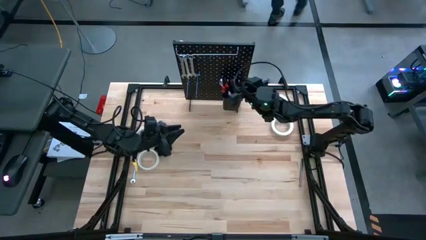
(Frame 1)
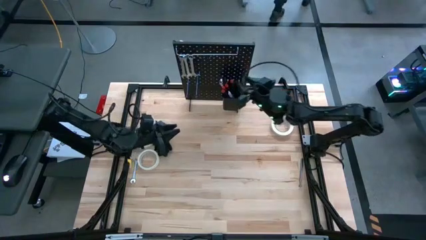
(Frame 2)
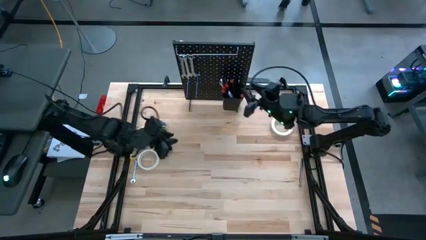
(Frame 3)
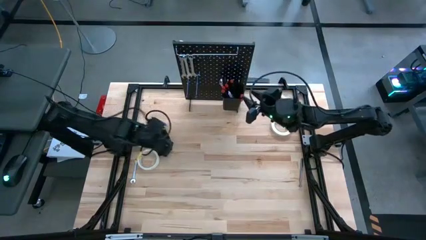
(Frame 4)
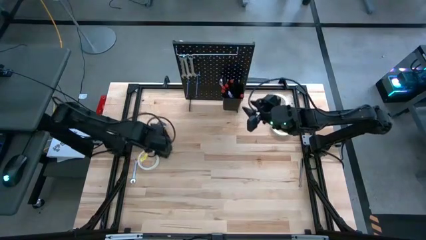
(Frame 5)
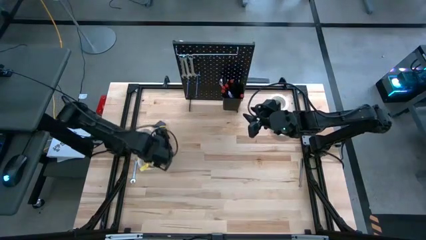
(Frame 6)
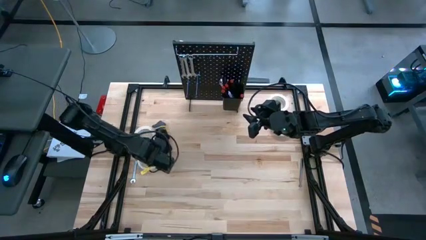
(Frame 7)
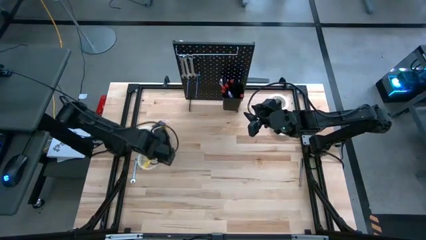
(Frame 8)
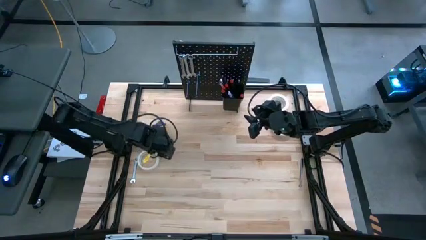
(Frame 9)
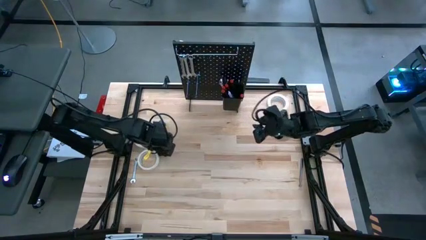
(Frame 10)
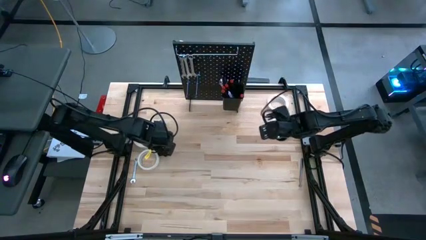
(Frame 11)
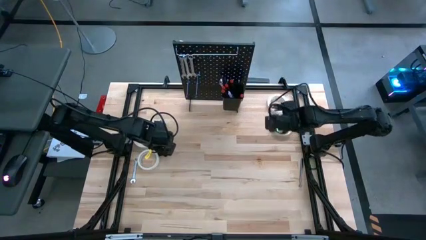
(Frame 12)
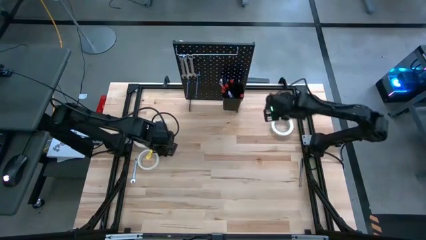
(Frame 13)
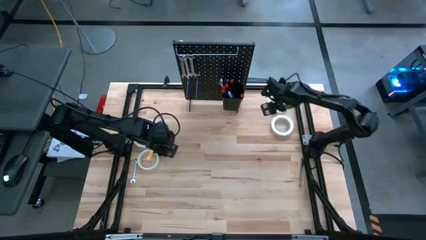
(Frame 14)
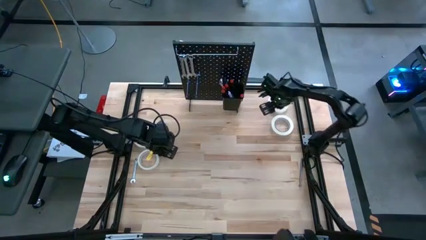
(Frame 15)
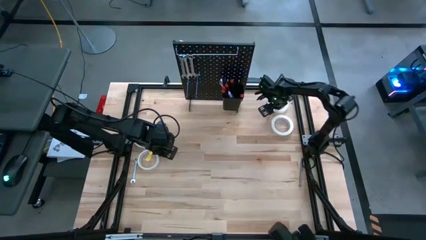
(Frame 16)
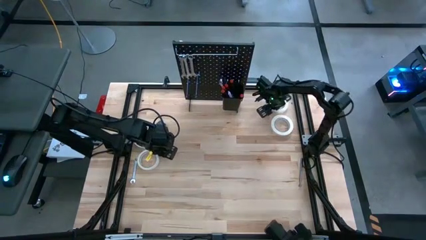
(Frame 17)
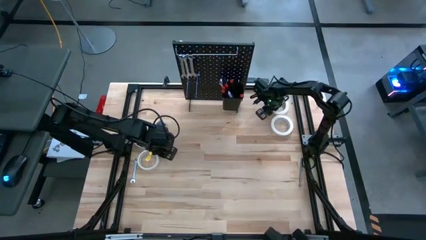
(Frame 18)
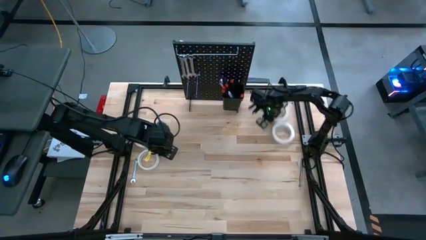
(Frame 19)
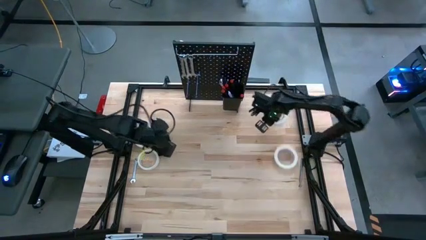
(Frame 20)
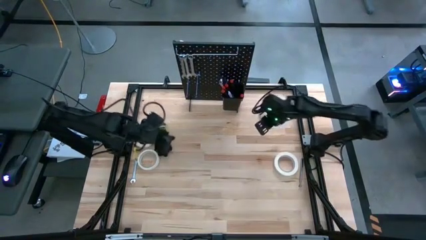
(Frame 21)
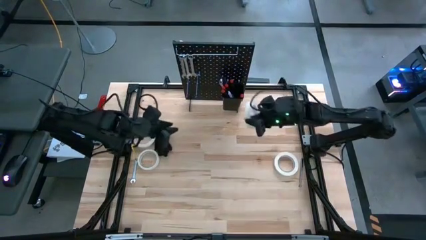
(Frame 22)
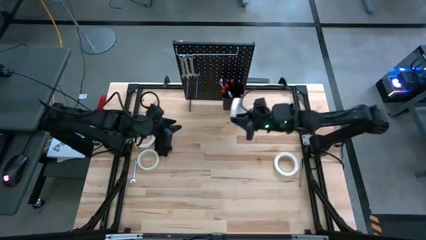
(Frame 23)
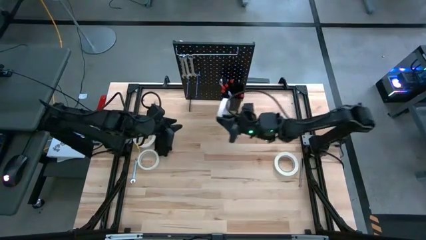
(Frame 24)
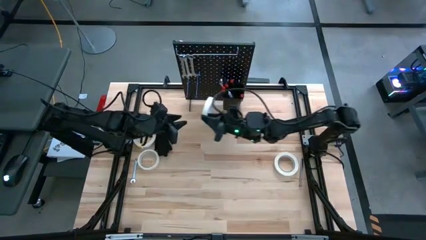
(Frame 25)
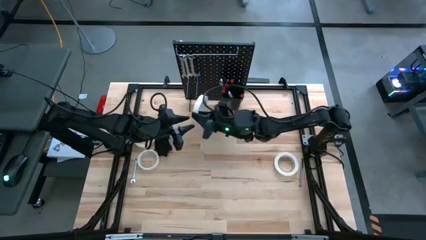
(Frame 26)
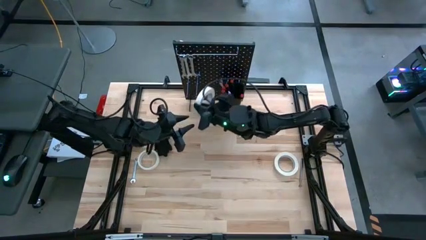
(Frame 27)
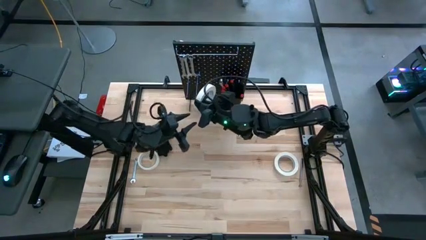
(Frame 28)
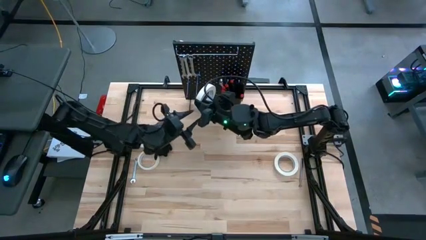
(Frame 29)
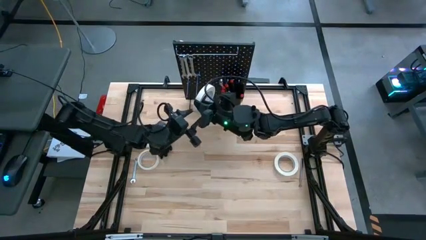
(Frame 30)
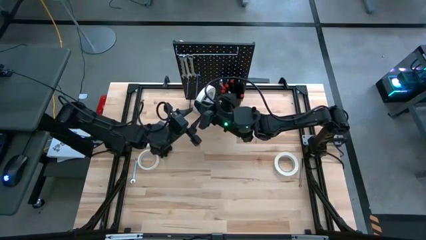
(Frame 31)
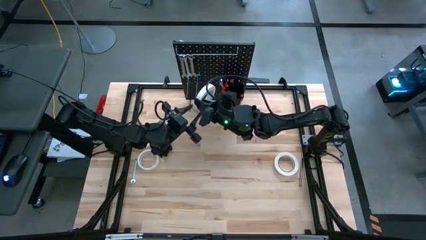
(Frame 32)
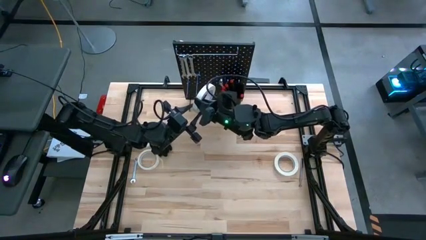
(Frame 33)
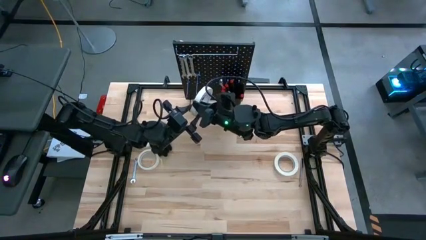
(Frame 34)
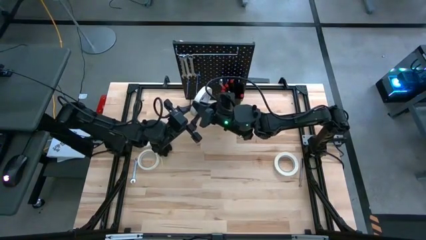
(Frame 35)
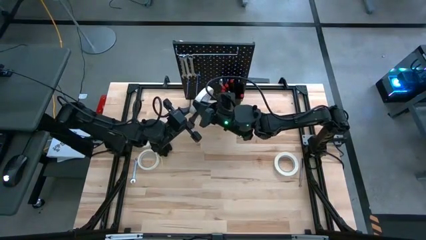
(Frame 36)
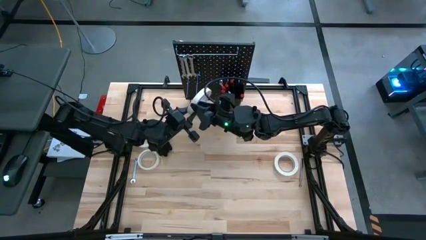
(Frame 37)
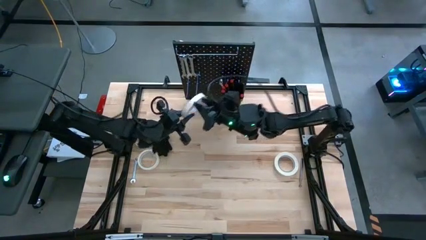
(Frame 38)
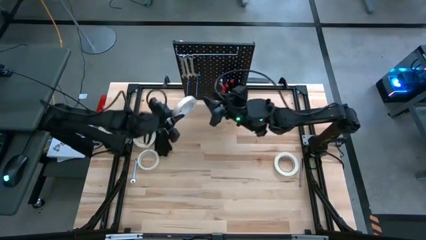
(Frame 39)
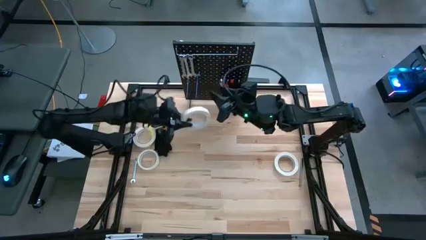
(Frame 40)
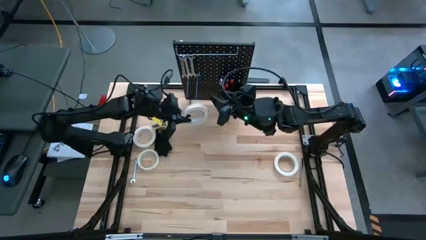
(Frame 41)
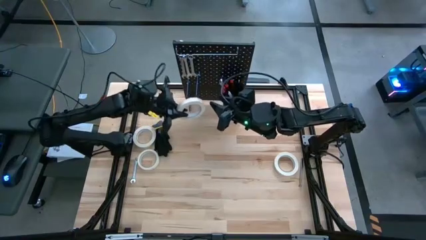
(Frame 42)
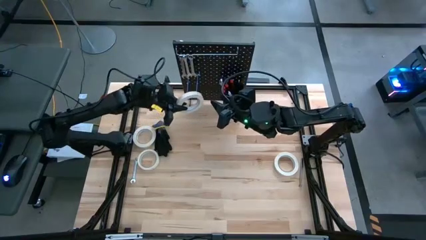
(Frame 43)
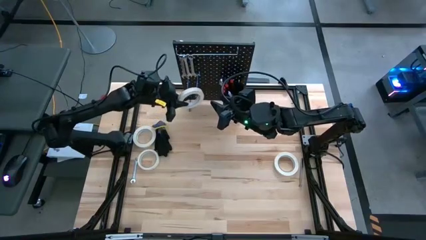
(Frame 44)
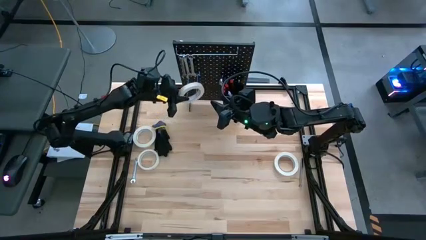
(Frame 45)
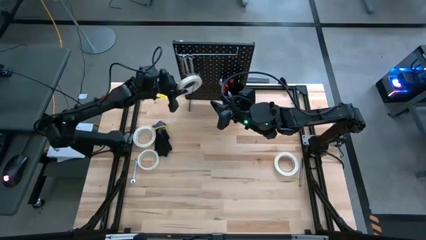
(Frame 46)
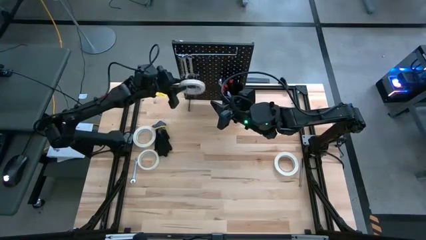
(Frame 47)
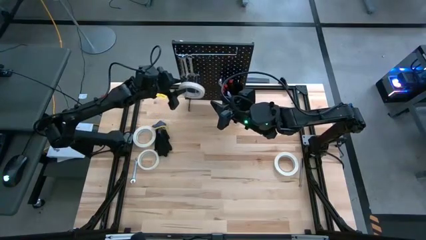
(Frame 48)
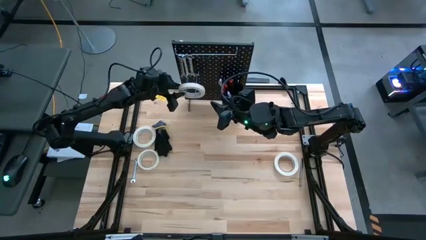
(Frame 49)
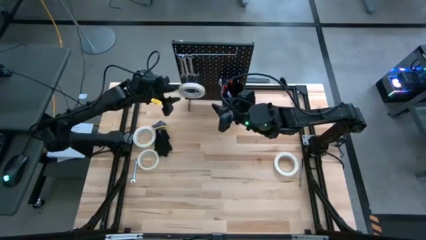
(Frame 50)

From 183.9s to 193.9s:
Task: Hang tools onto peg board
Hang the top right tape on the peg board

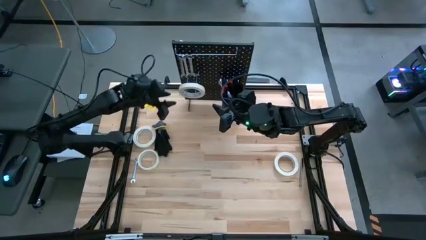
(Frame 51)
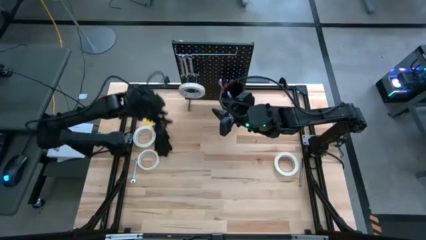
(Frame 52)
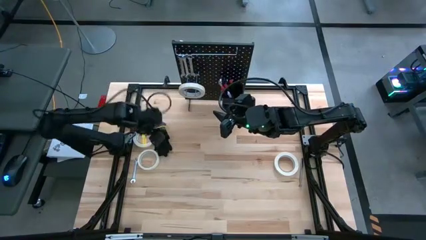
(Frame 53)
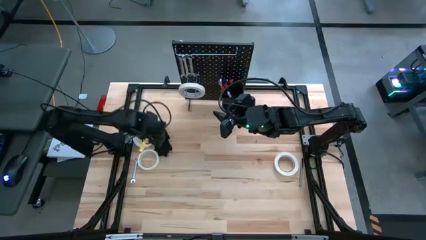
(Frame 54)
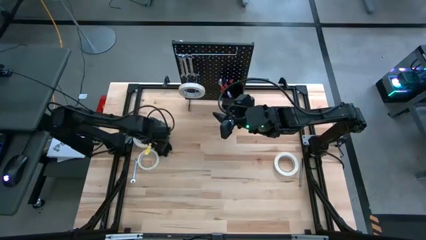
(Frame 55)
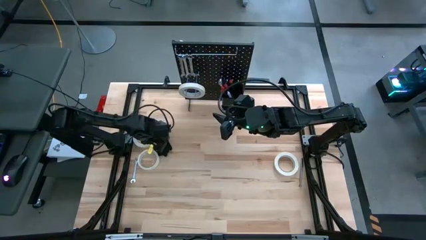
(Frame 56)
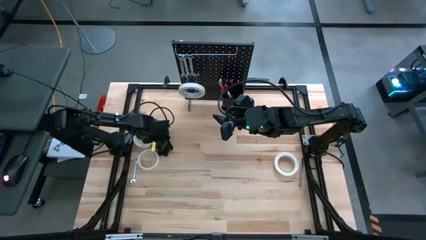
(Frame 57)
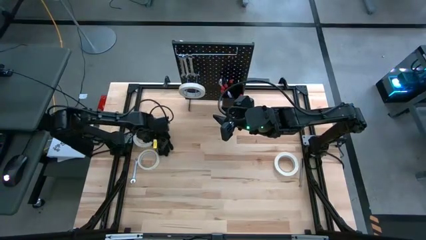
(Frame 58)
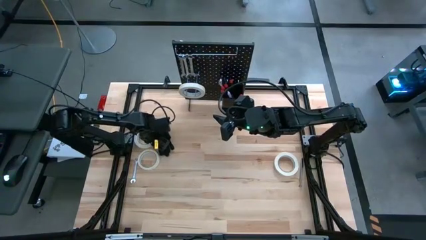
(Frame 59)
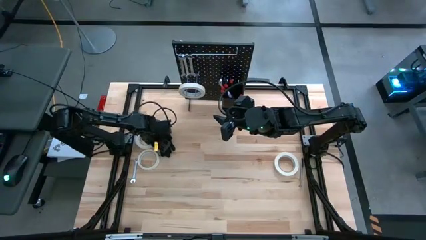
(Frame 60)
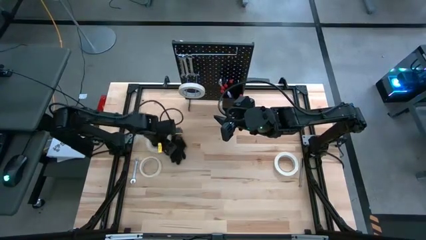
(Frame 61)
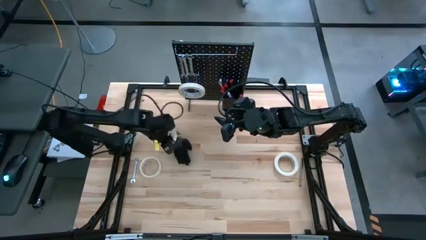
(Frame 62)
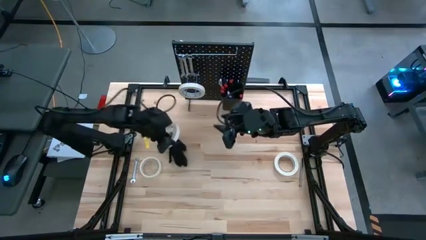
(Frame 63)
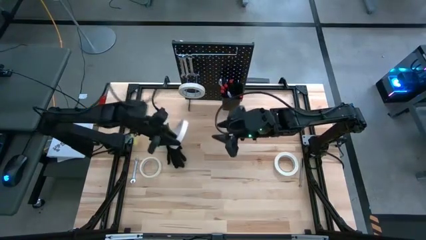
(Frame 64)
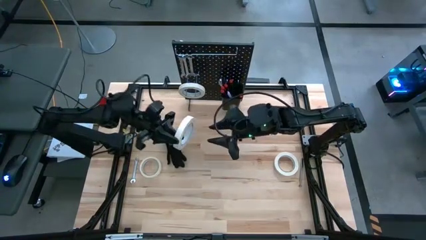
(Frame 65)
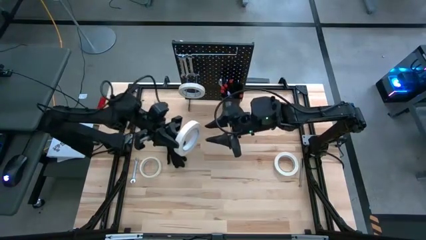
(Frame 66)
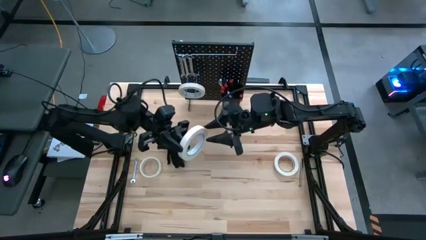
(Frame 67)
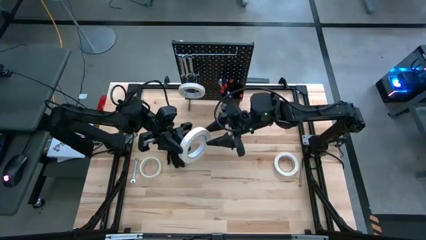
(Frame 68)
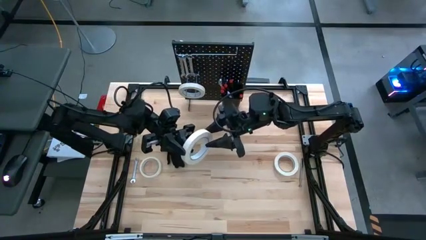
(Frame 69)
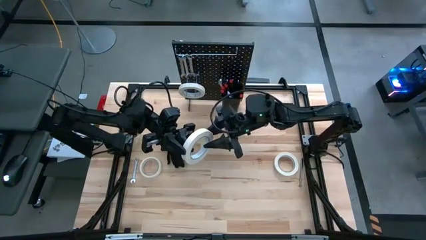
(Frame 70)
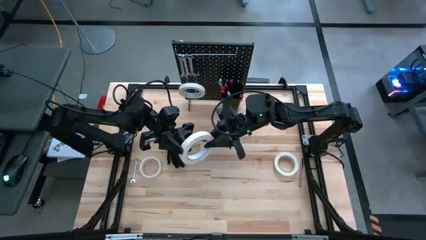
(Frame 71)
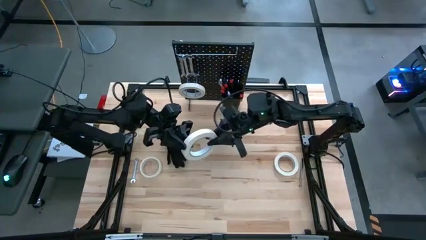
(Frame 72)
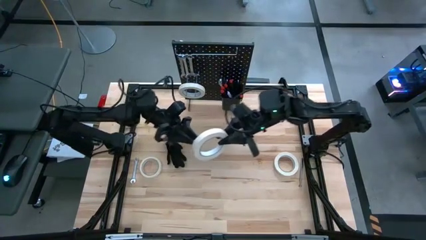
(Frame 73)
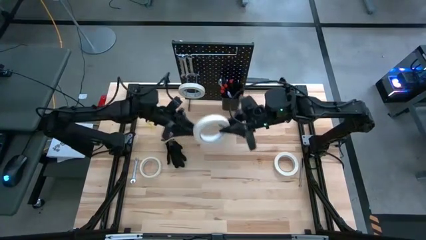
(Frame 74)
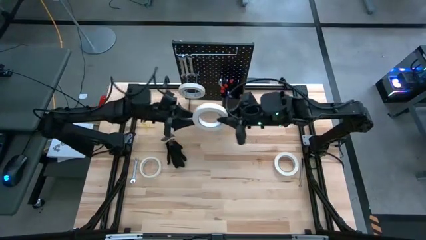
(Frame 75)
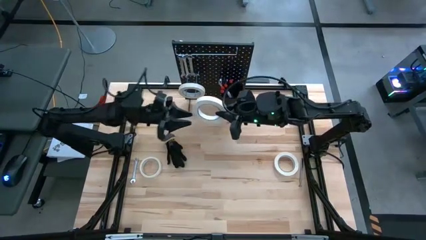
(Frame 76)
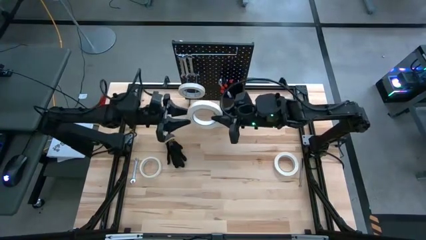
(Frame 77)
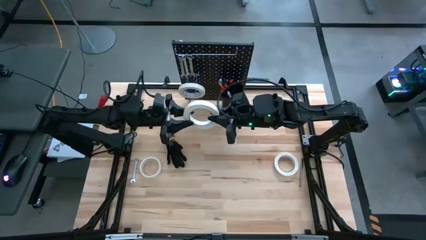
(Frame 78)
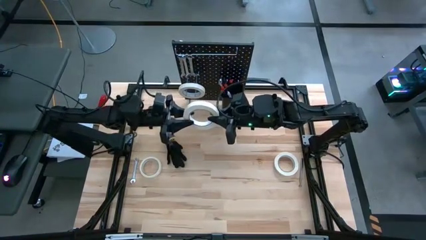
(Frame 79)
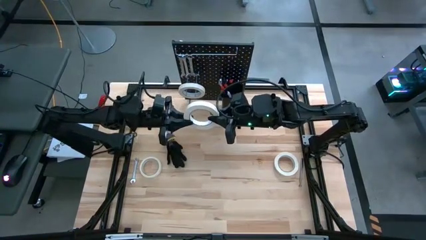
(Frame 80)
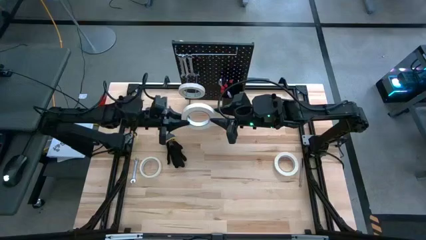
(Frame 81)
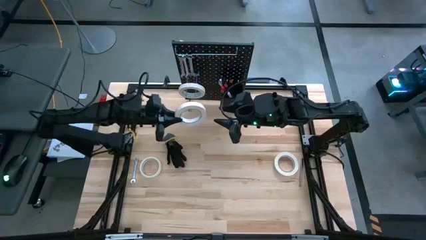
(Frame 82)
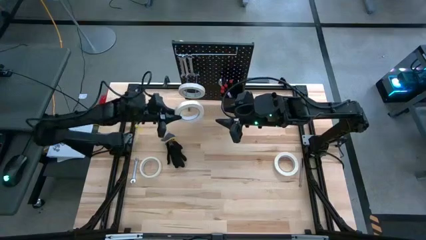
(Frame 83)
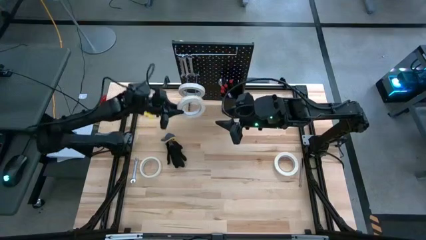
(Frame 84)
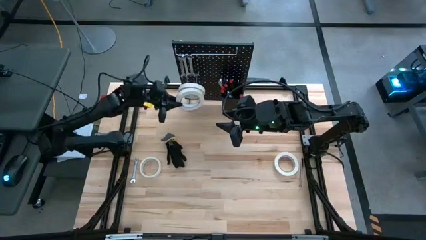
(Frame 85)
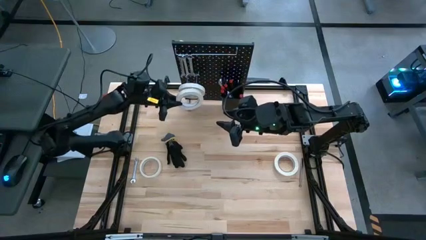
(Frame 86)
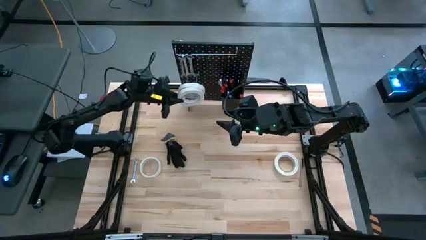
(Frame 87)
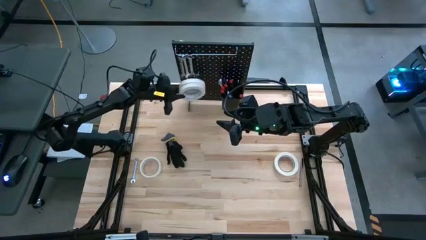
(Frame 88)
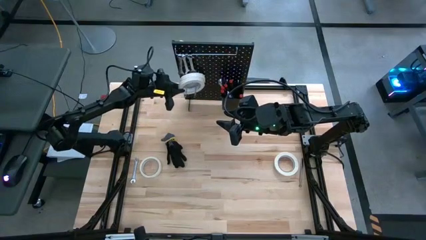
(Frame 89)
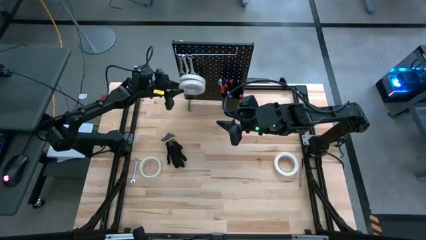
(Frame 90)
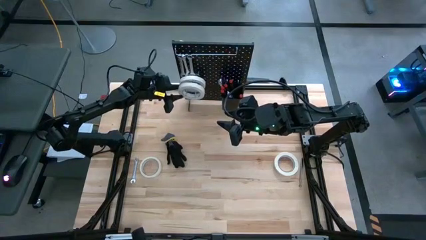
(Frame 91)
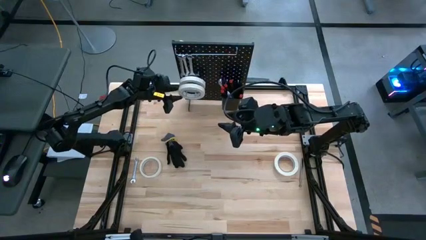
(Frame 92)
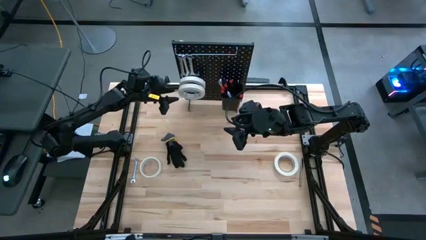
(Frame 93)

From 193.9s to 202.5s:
Hang the top left tape on the peg board
